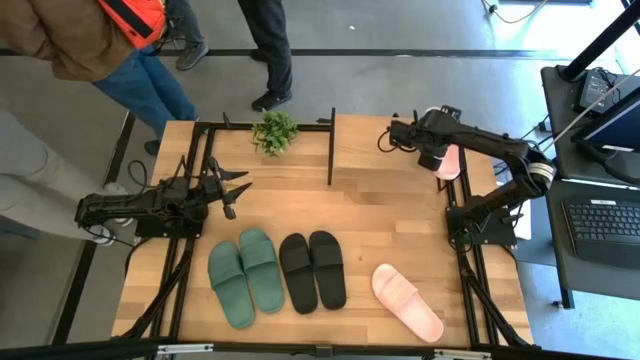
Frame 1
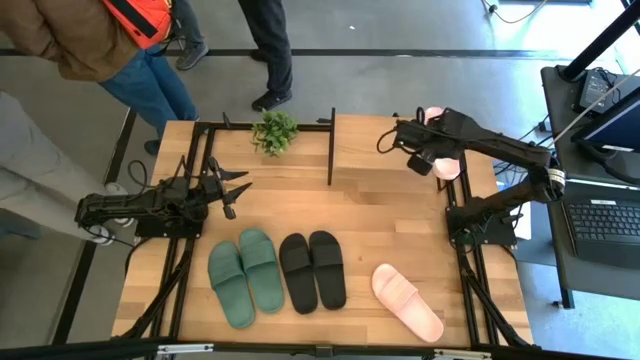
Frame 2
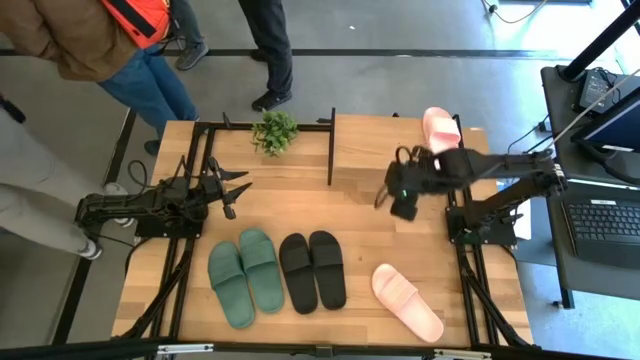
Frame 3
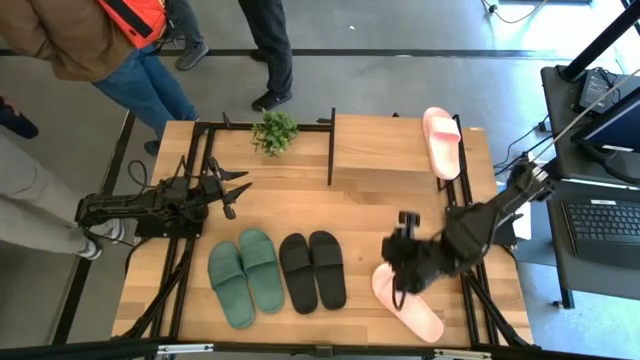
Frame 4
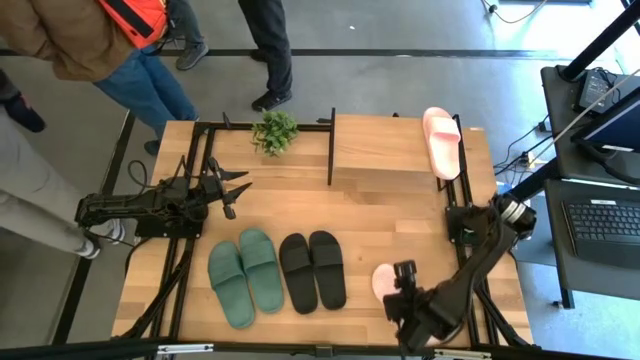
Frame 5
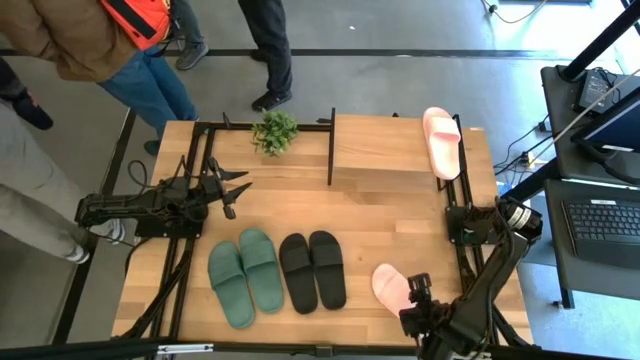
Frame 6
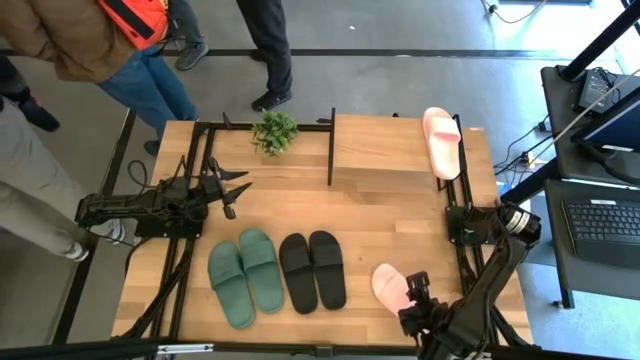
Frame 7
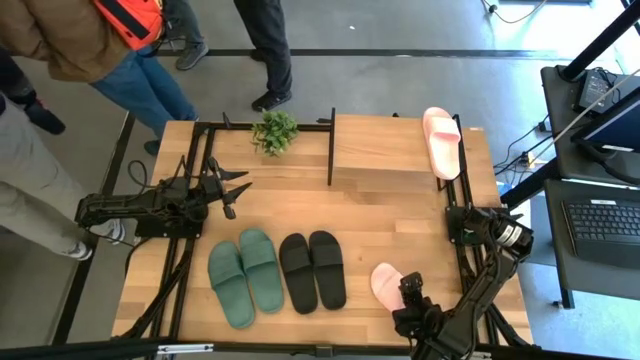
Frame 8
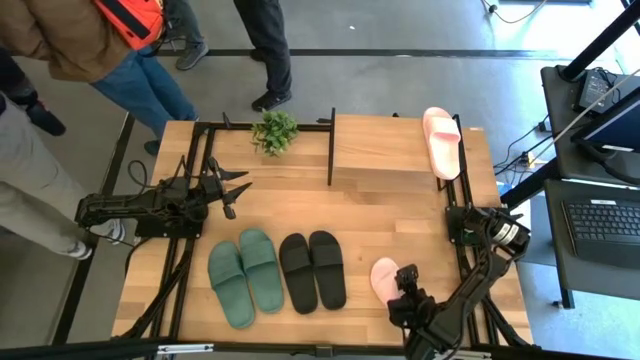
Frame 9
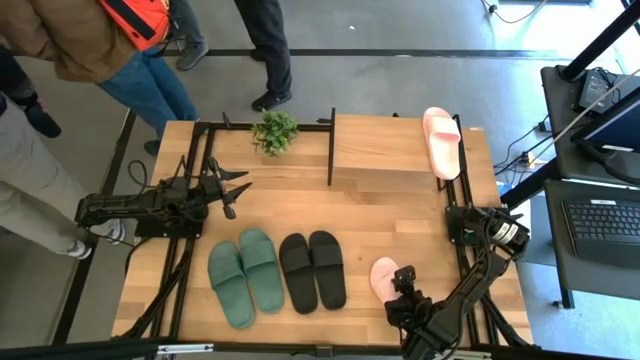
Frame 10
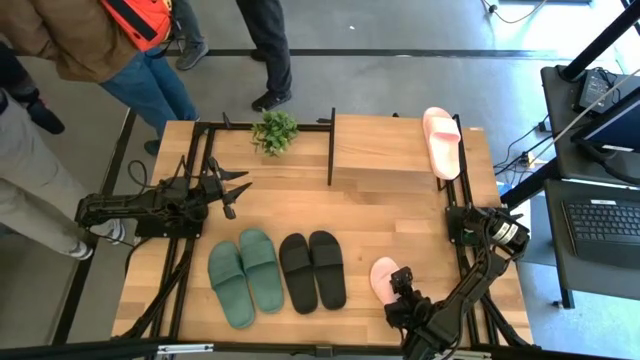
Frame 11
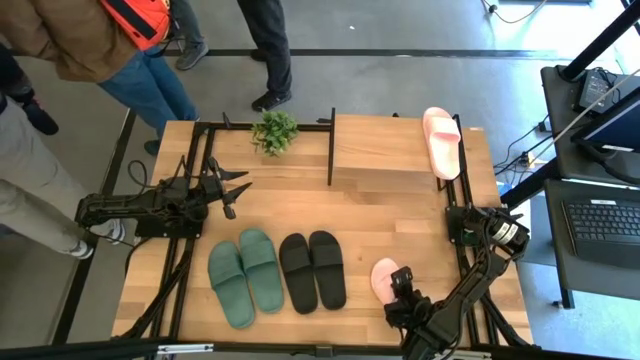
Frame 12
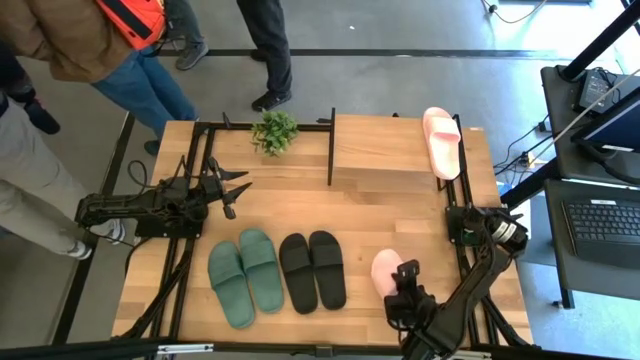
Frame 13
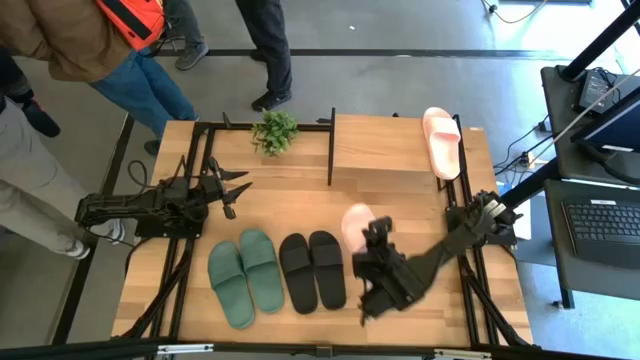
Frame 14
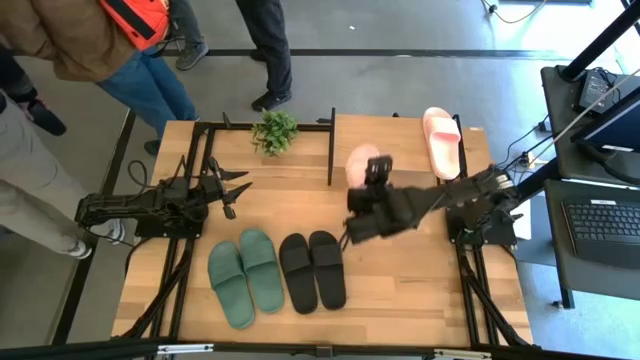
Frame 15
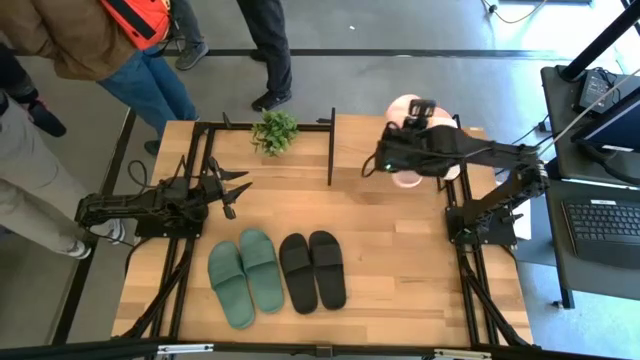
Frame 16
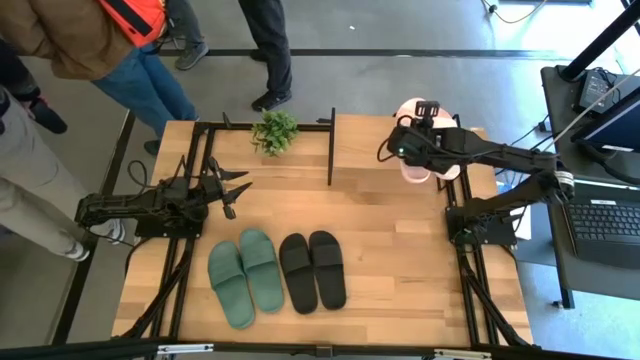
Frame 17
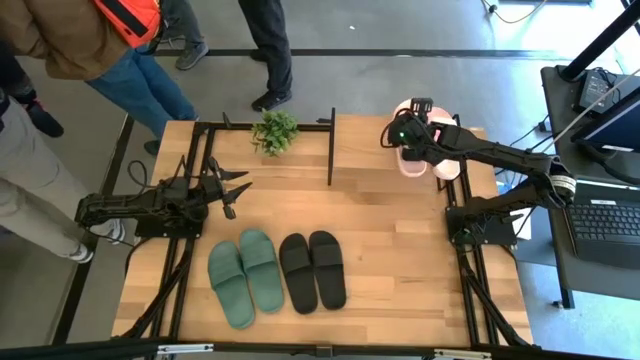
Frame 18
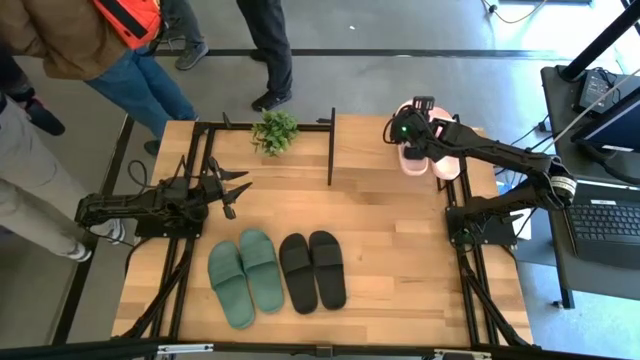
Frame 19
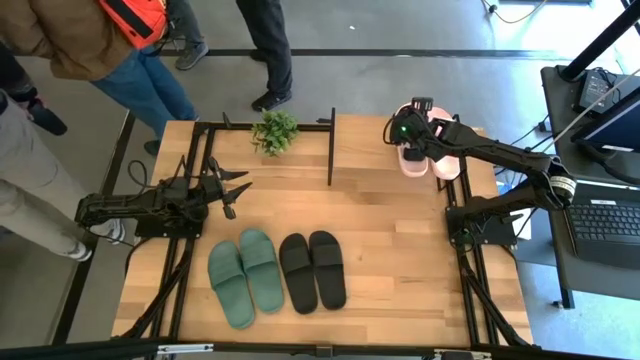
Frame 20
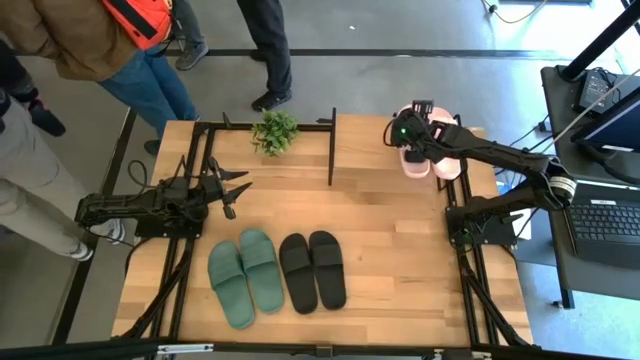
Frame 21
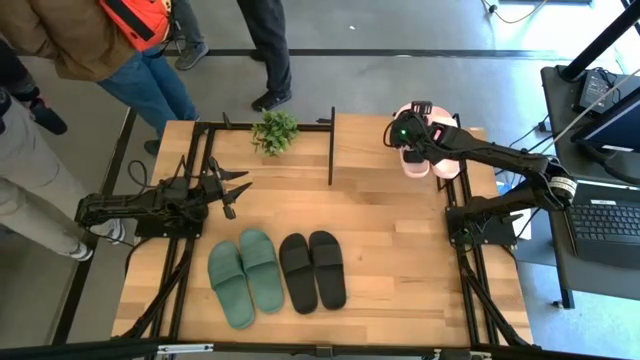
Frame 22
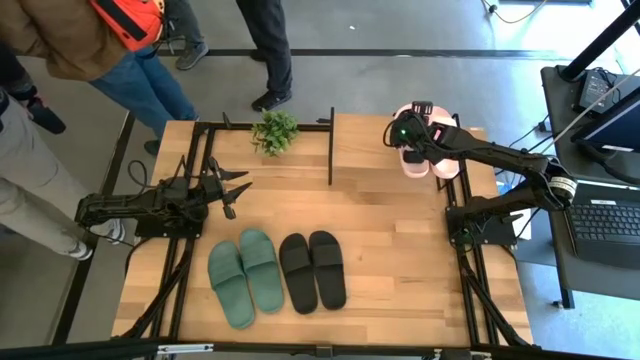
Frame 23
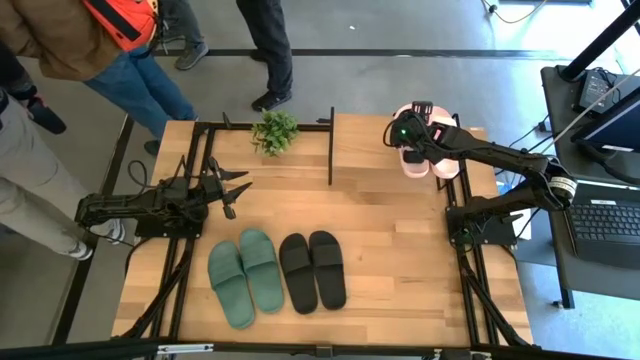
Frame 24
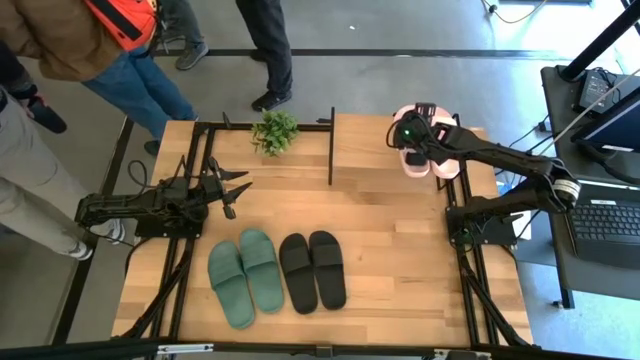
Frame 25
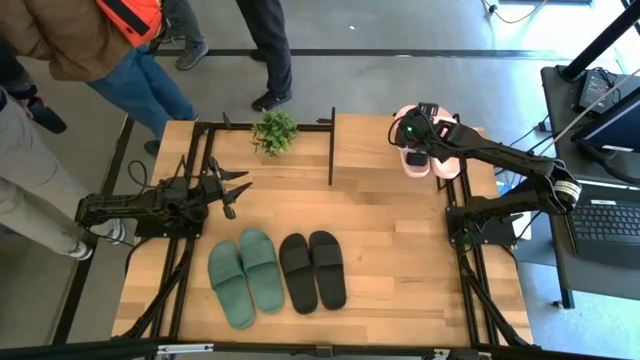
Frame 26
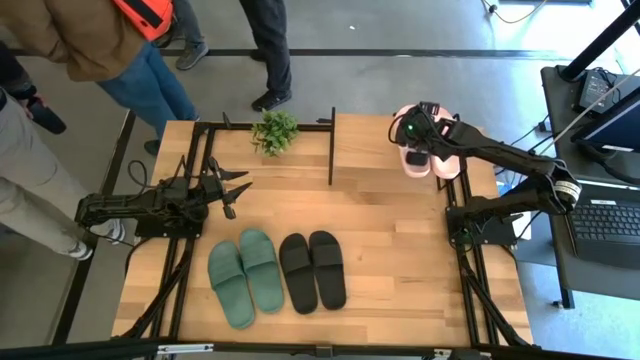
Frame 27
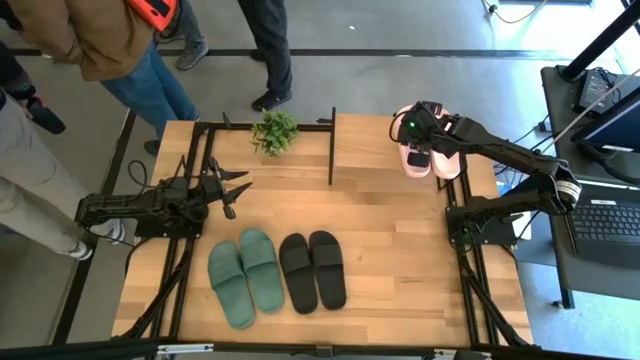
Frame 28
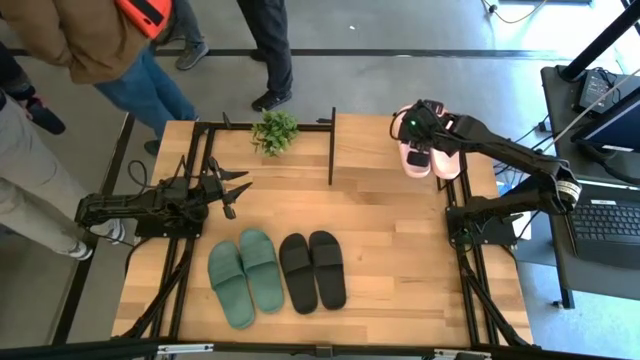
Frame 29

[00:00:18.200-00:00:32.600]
Task: Pick and place slides into the shelf
Put the pink slide on the shelf

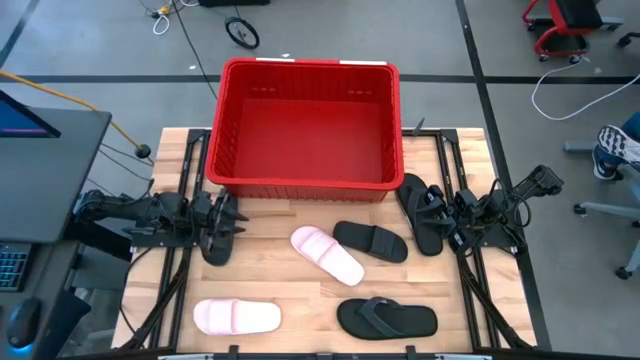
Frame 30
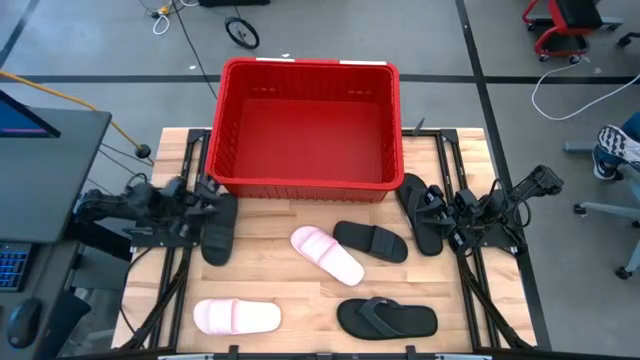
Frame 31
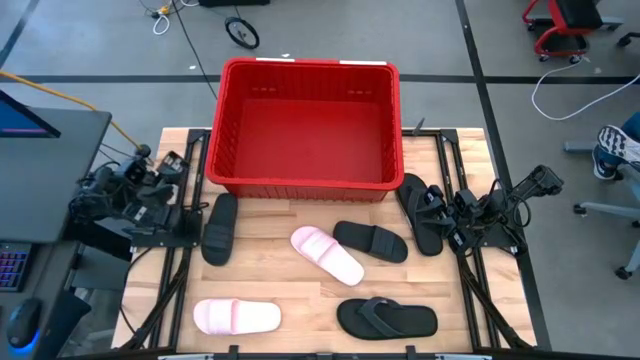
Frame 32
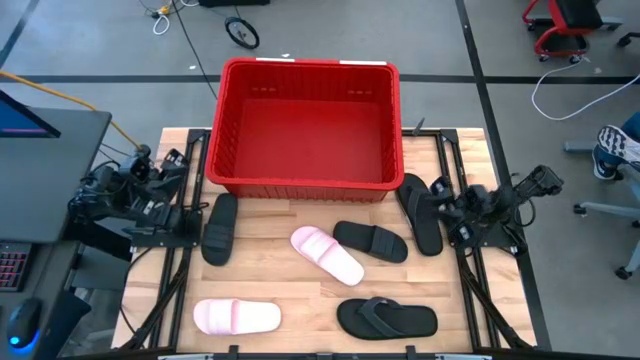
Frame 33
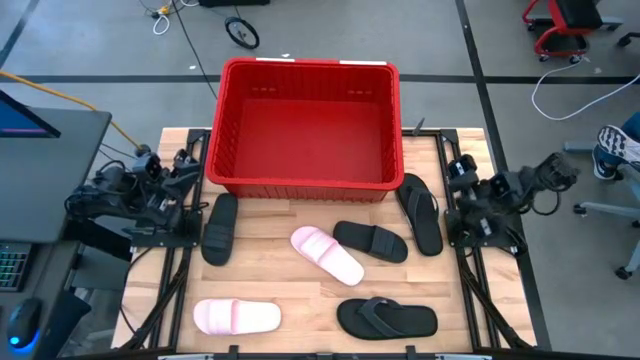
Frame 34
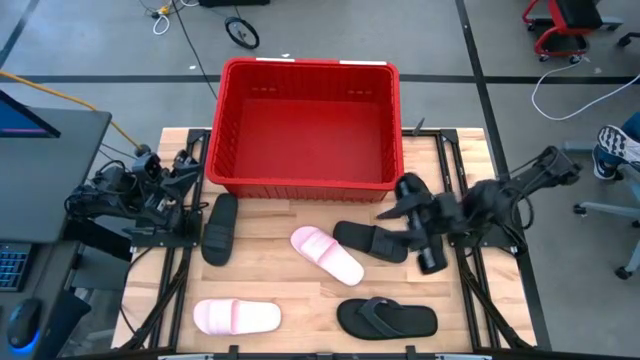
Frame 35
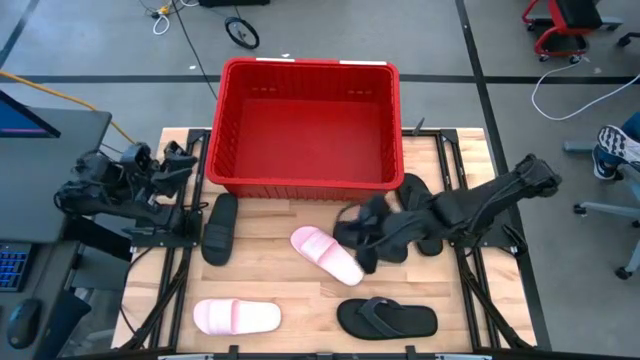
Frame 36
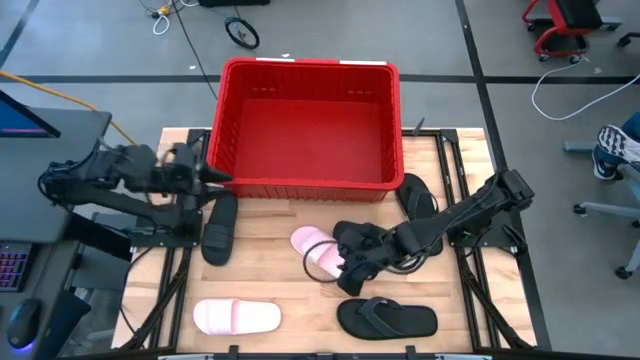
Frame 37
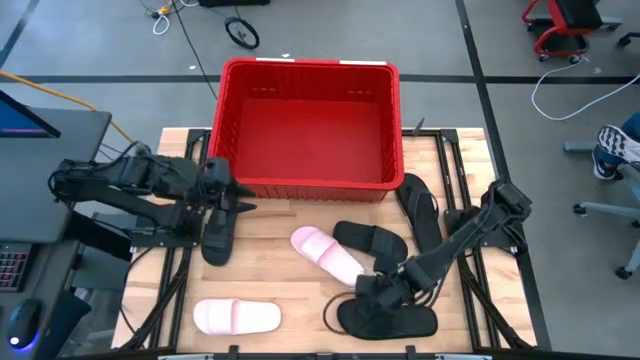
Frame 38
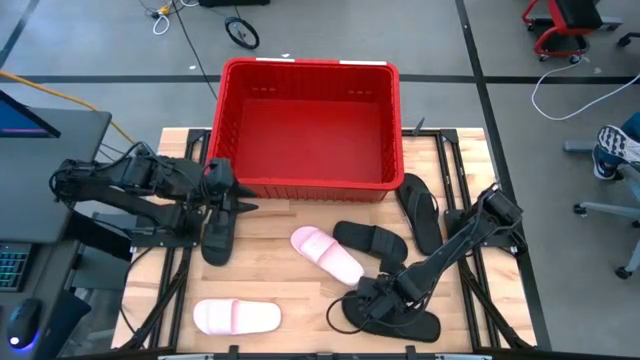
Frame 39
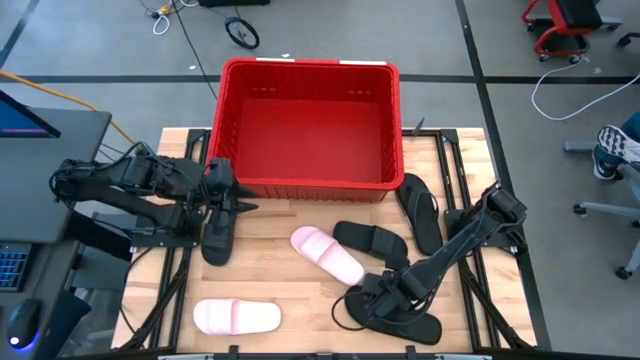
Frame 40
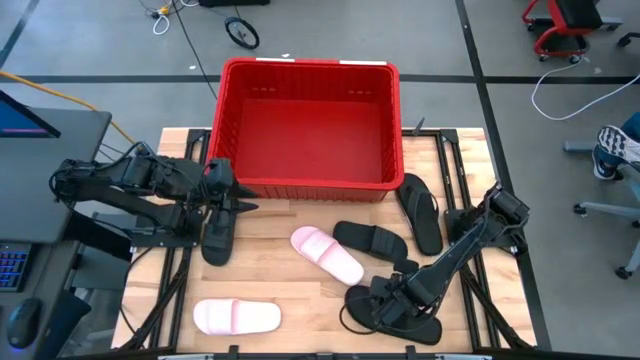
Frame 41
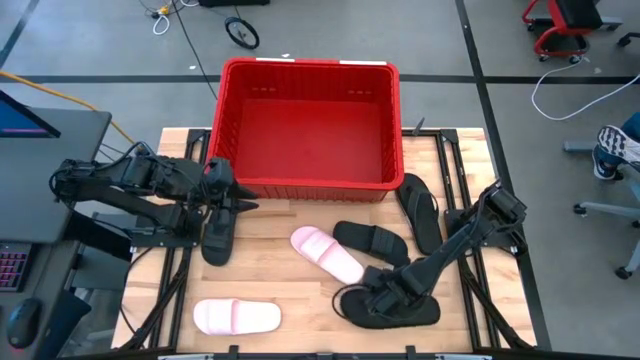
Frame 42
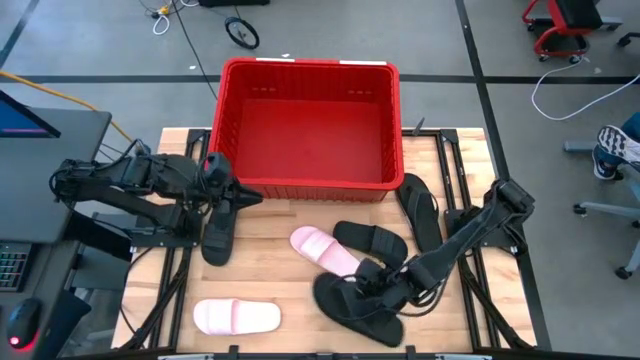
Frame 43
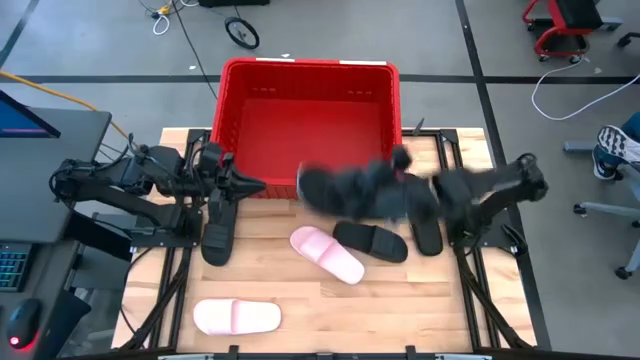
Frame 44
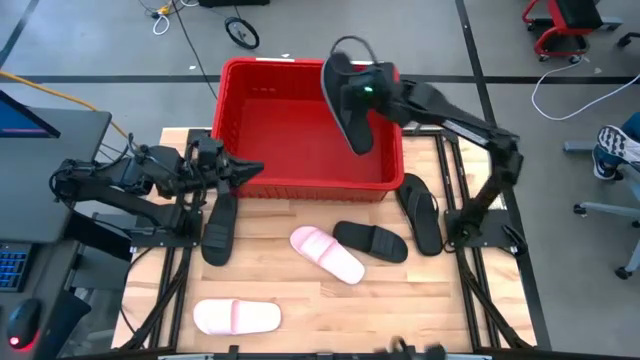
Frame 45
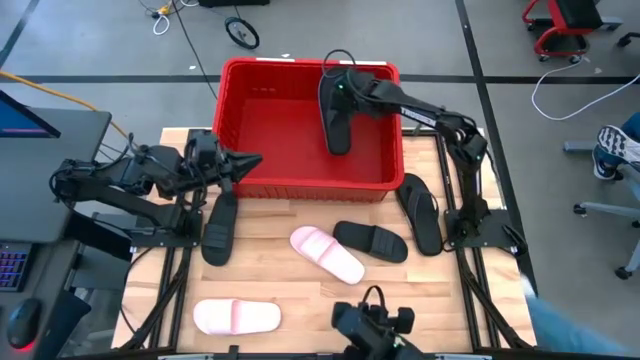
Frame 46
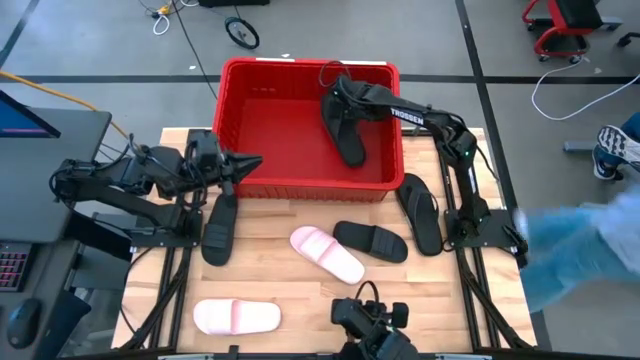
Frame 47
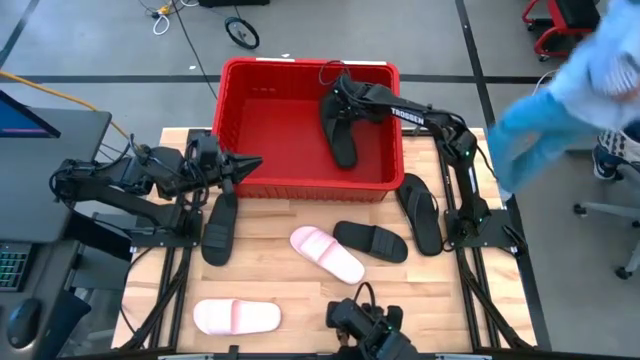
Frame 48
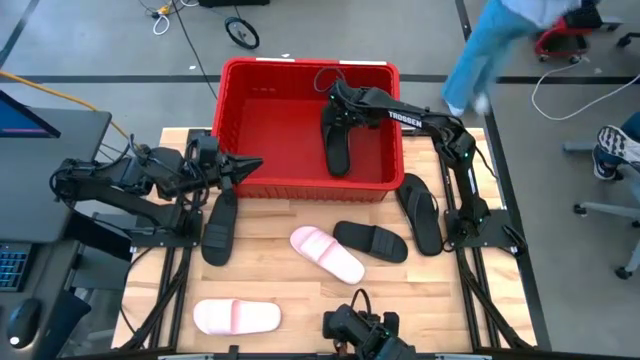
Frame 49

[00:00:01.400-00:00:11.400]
Task: Pick and place slides into bin
Put the bottom black slipper into the red bin
